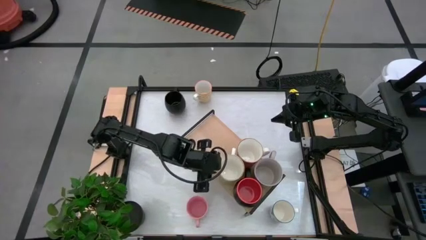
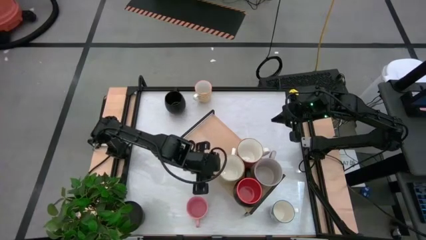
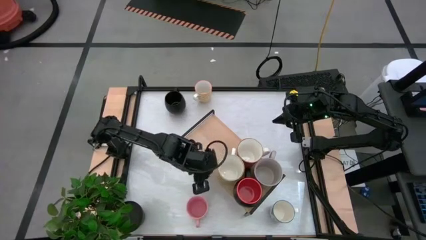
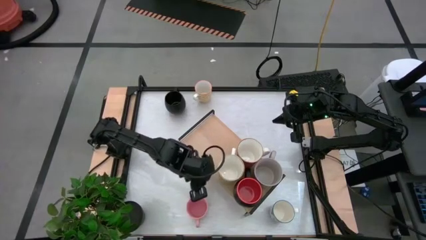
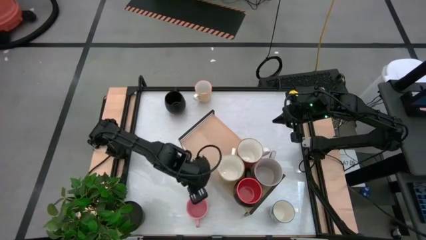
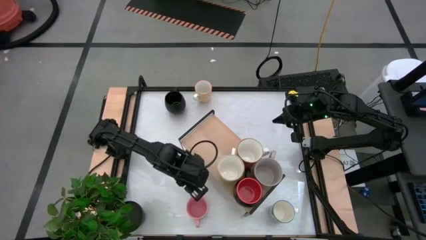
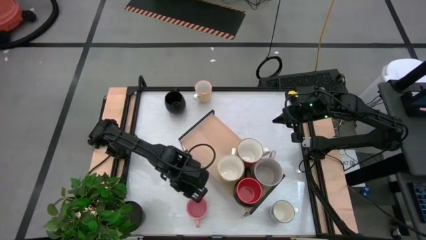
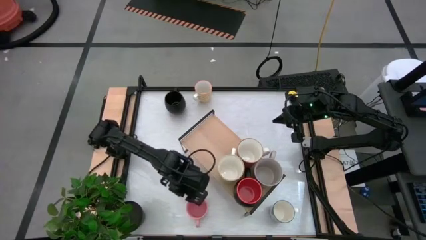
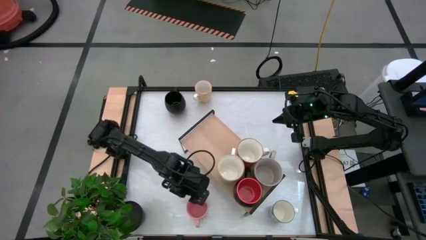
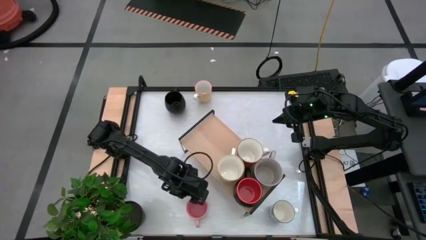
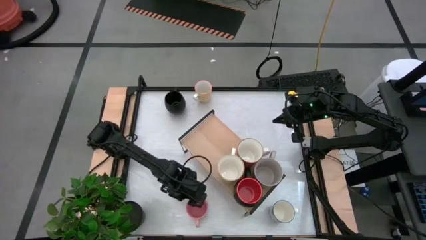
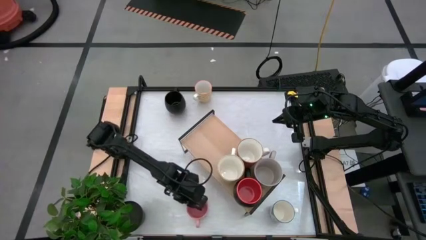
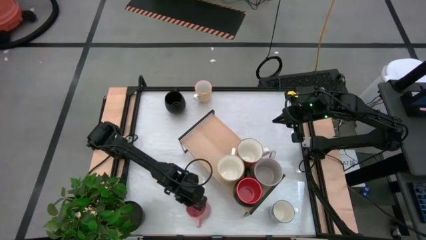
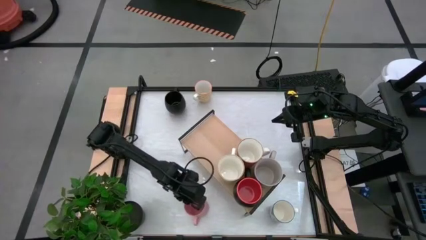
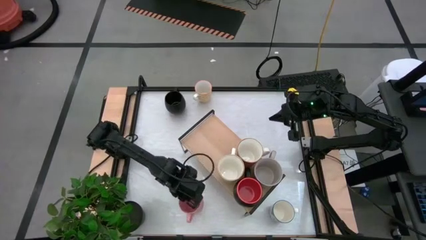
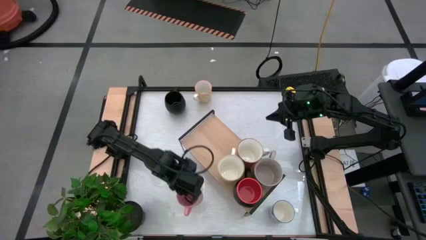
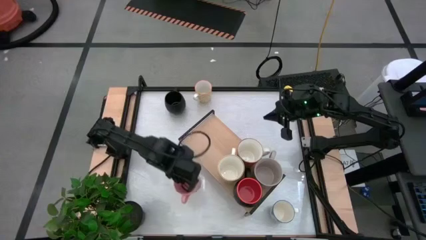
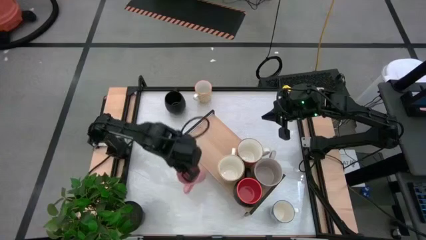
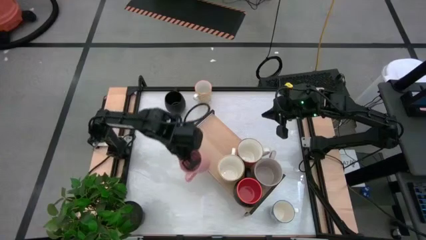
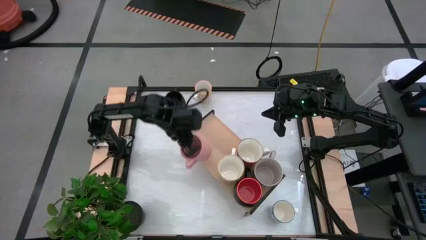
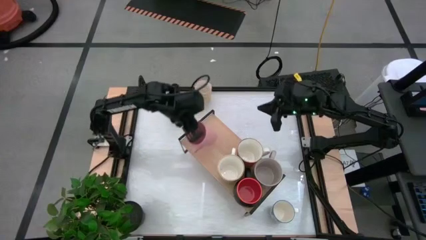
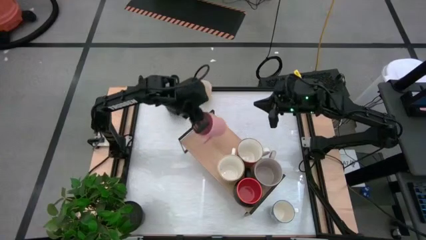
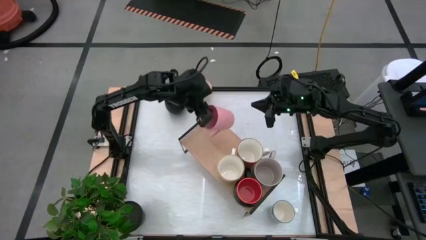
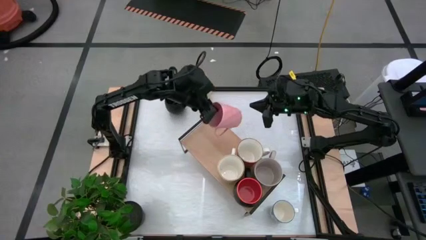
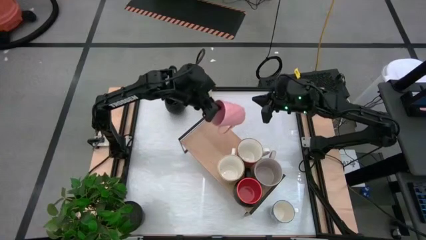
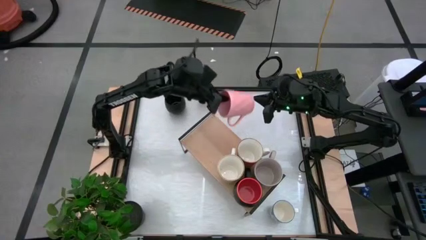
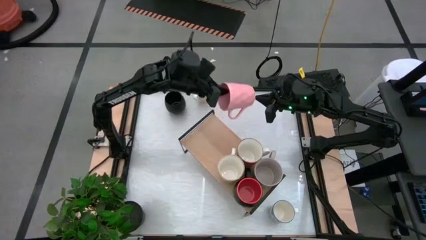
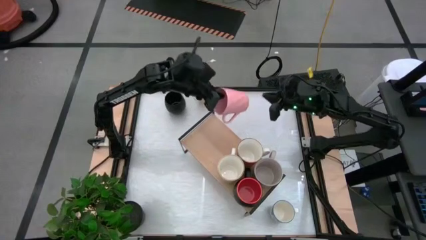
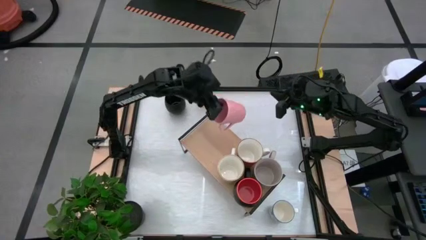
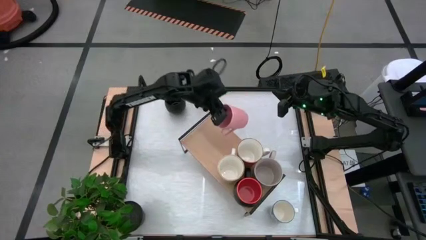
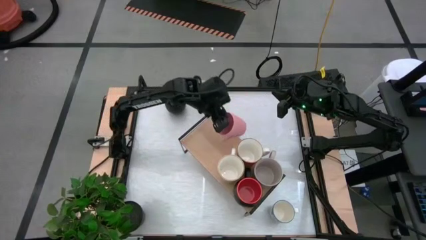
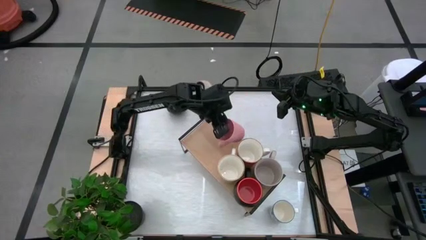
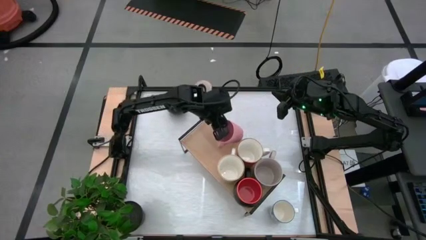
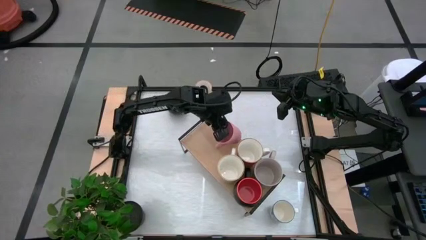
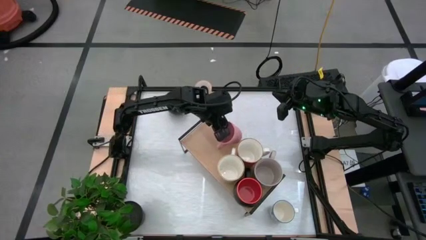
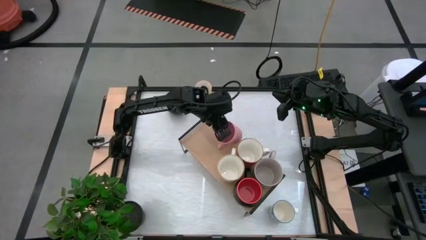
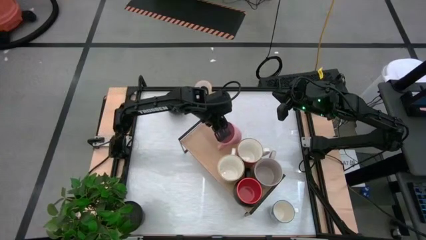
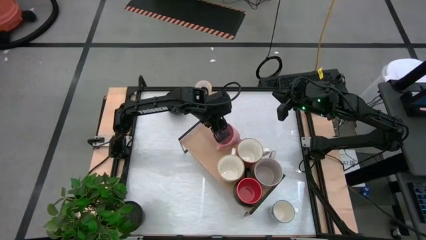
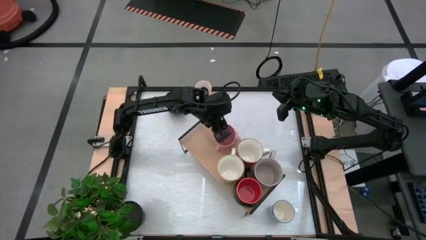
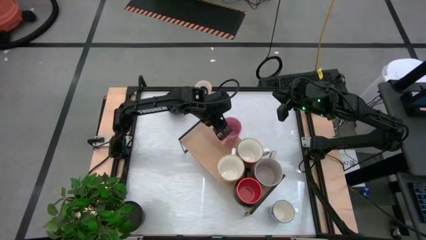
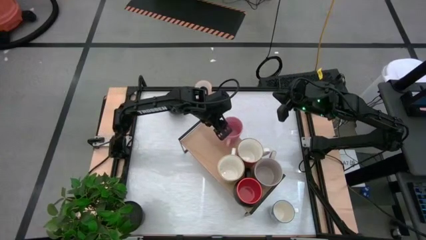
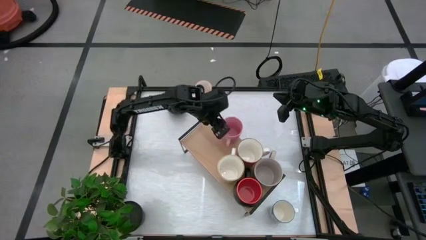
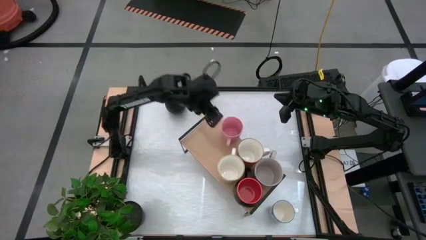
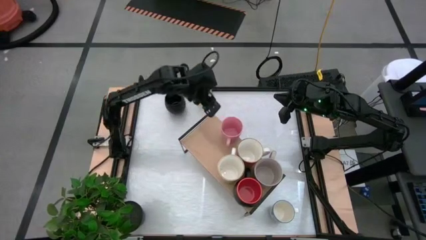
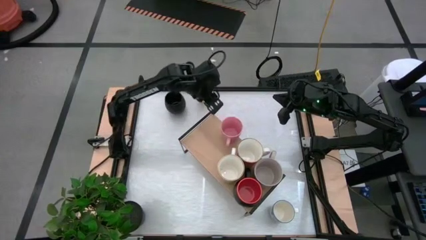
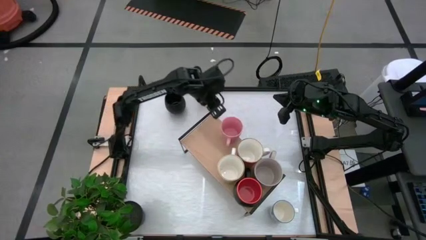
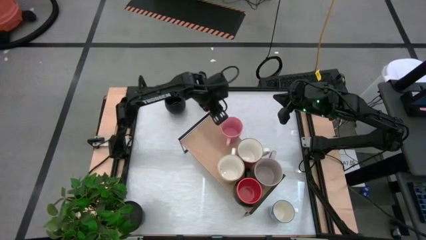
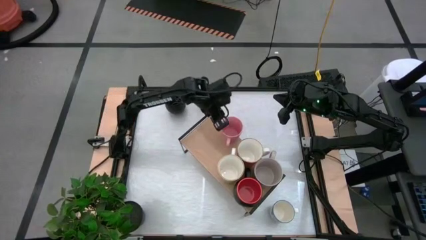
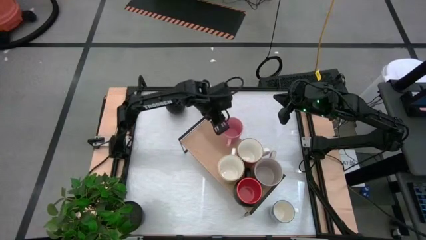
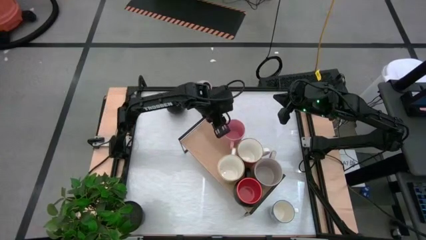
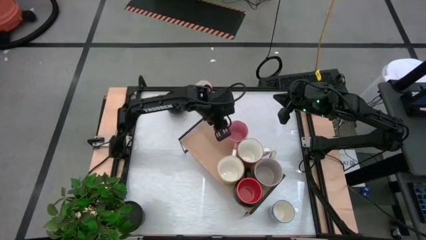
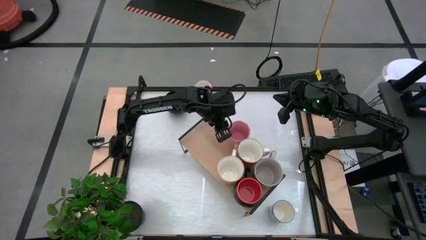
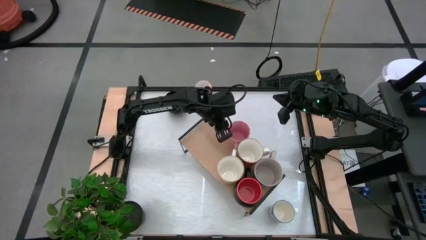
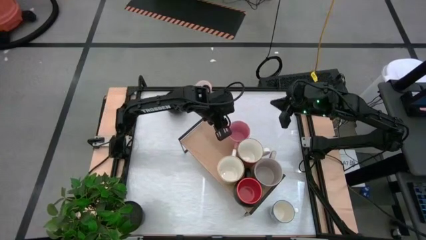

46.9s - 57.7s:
Task: Place coffee mugs
Put the pink mug on the shelf

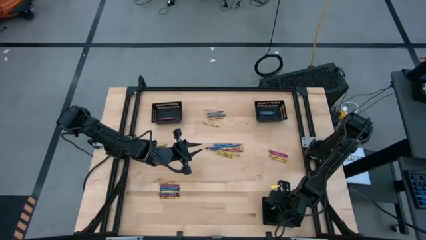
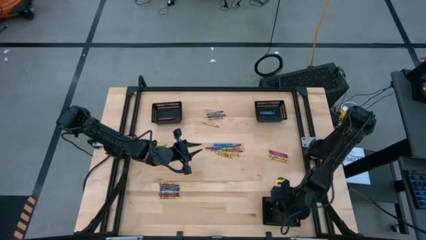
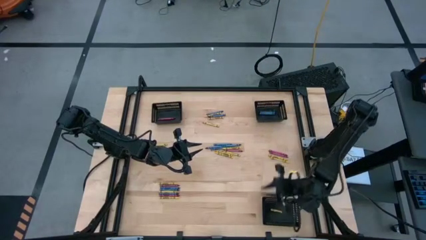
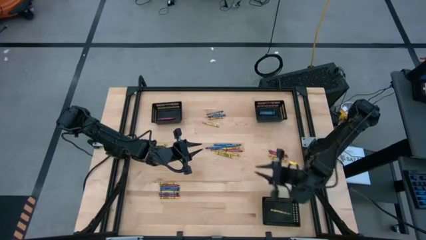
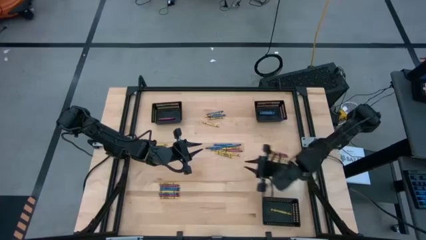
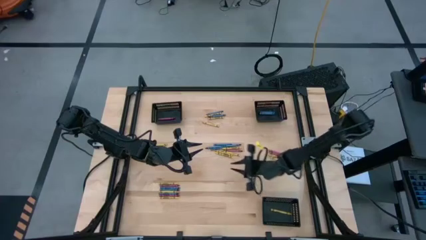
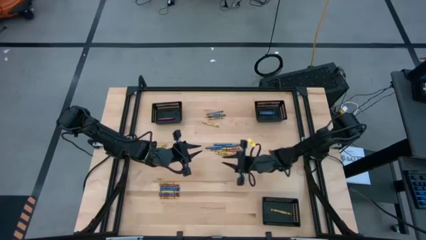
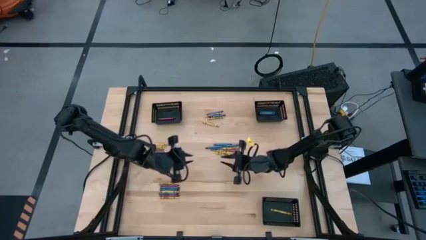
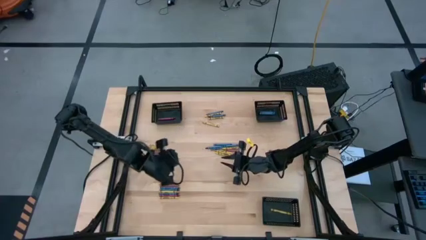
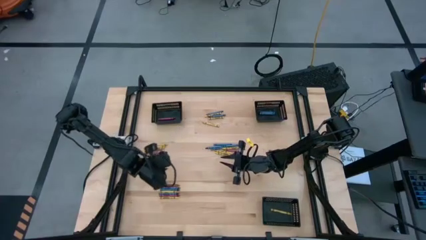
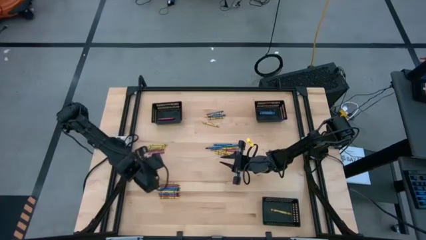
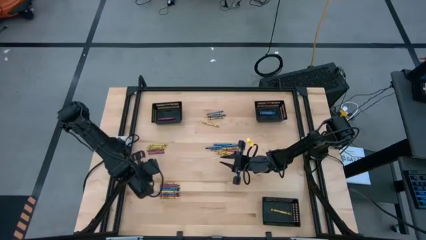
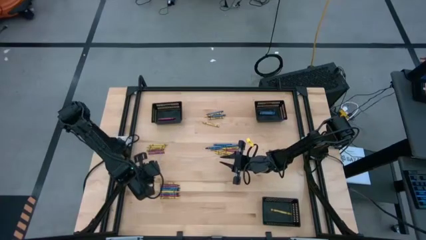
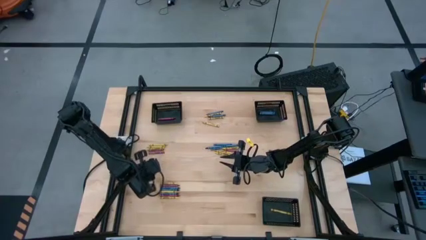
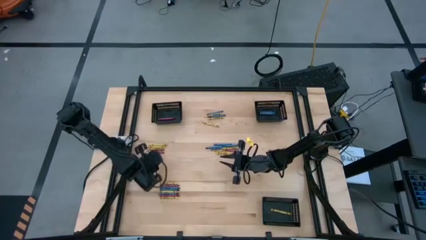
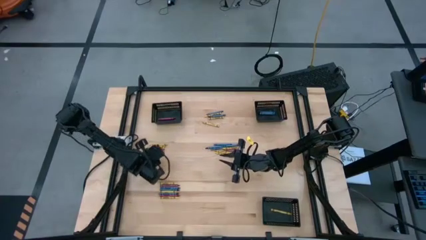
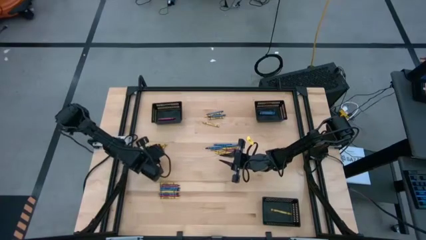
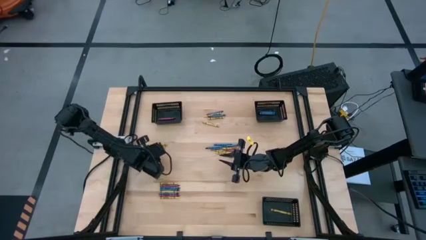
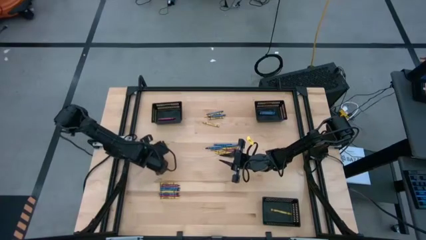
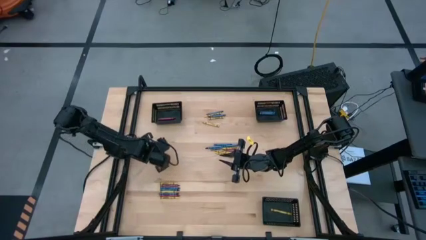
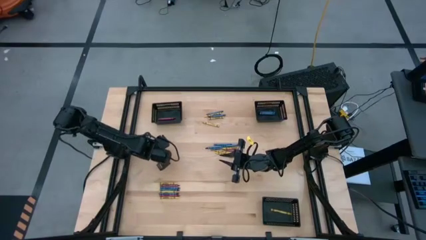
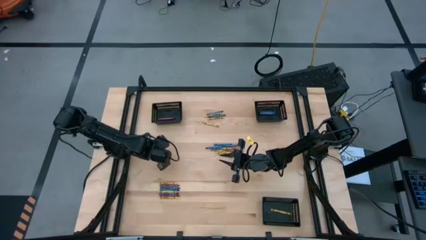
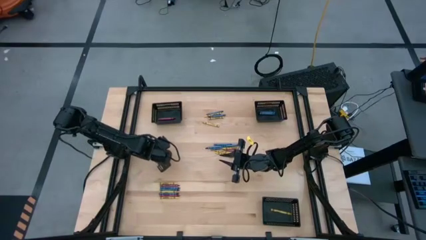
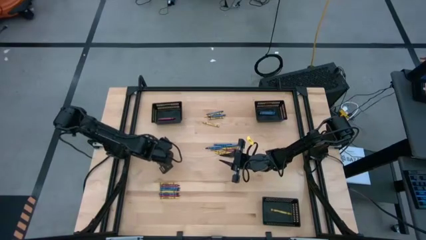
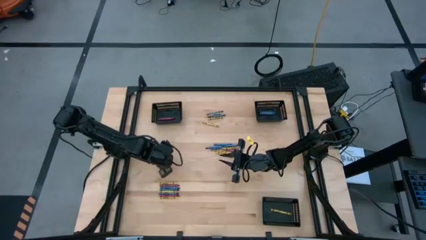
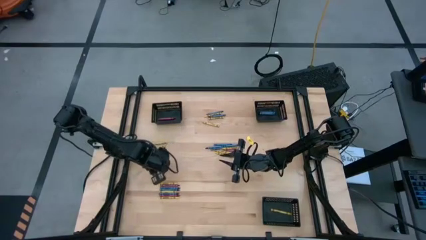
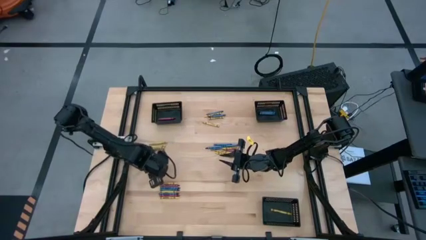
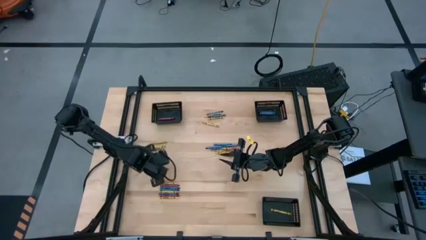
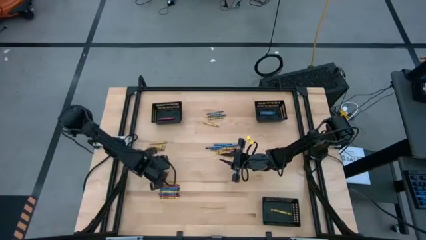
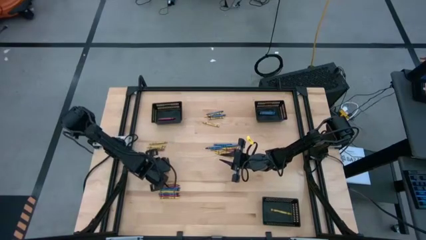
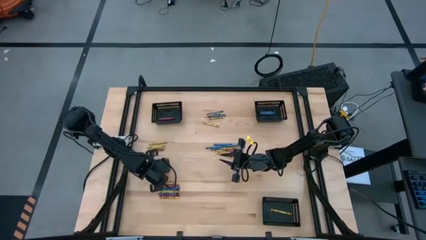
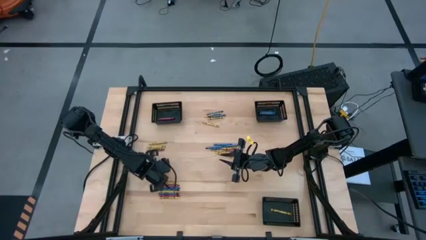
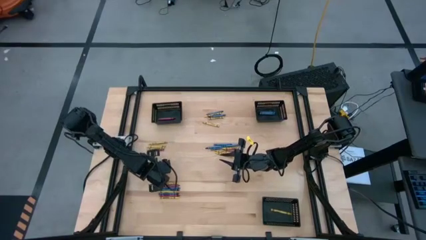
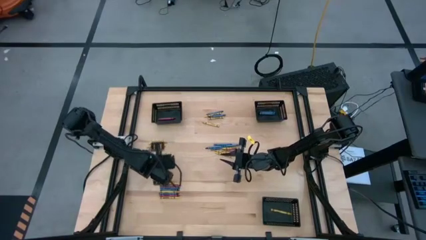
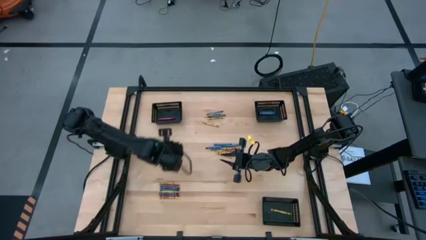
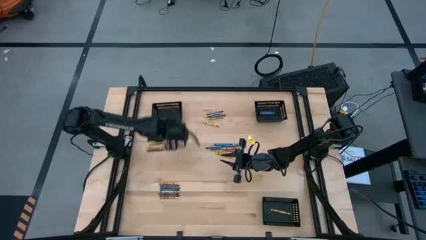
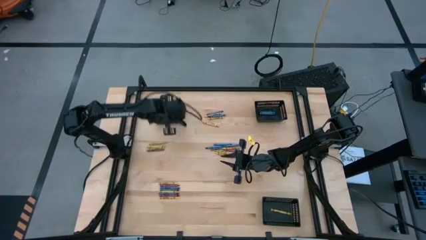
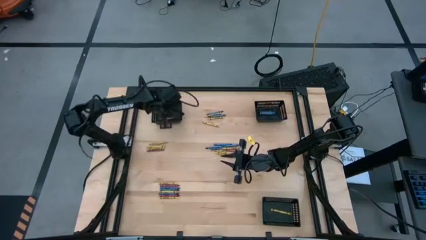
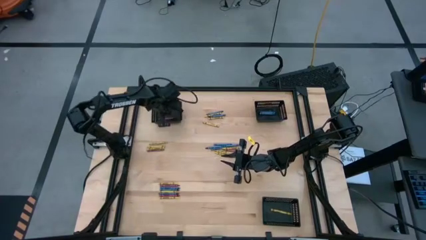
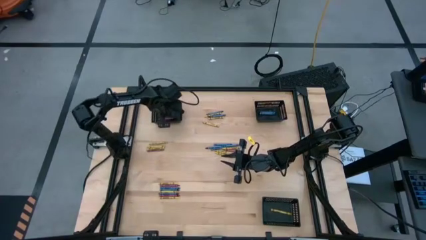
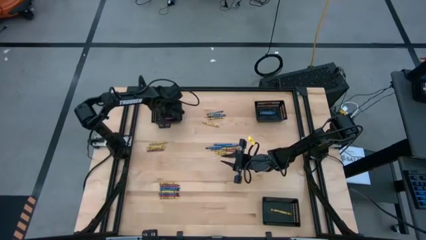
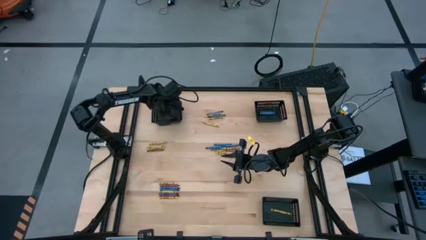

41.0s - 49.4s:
Task: Sort crayons
Put the red crayon into the top left black bin
